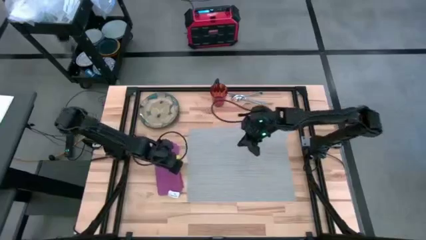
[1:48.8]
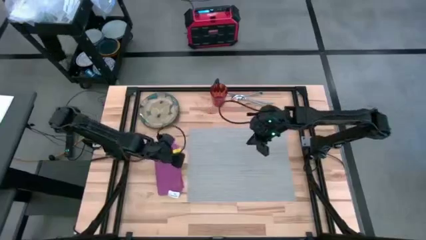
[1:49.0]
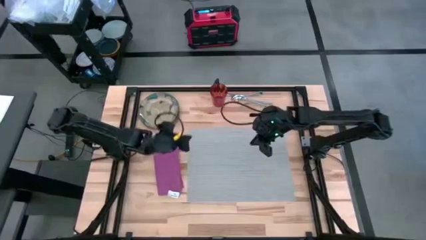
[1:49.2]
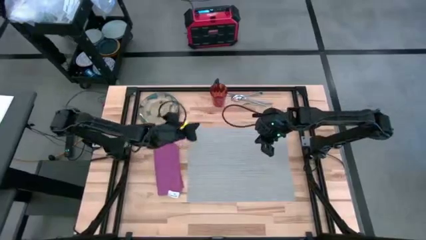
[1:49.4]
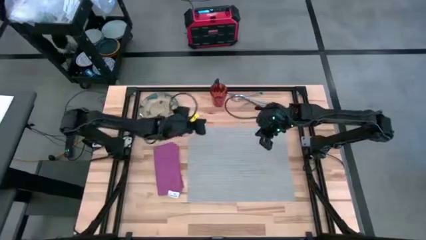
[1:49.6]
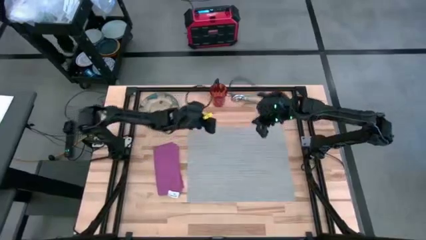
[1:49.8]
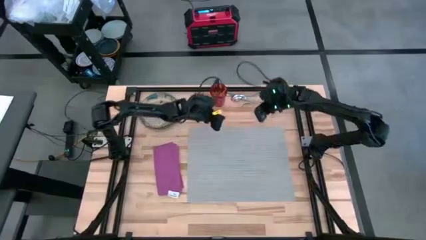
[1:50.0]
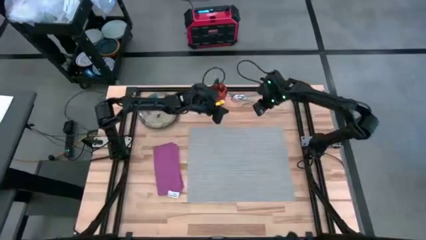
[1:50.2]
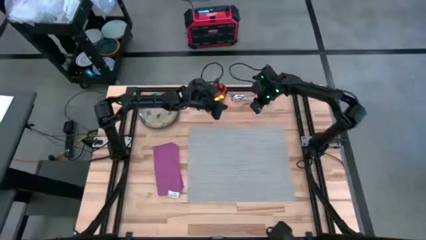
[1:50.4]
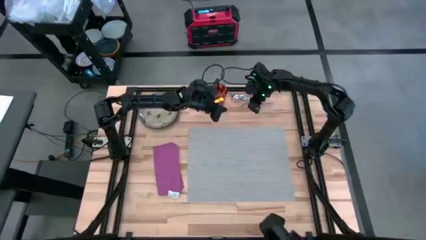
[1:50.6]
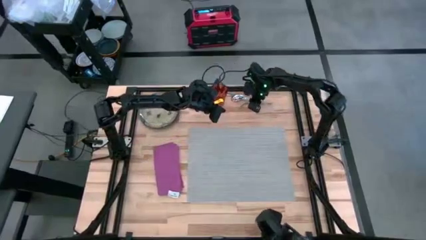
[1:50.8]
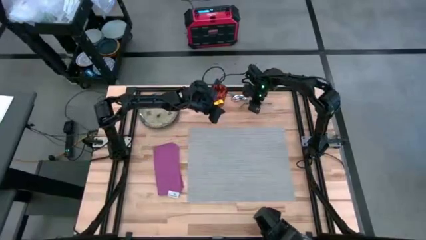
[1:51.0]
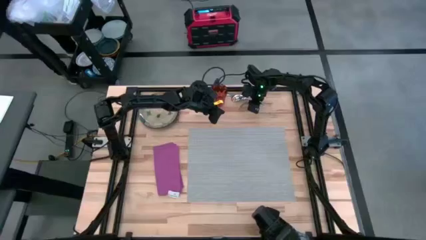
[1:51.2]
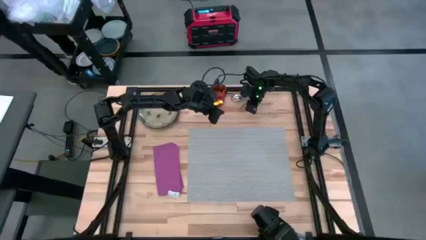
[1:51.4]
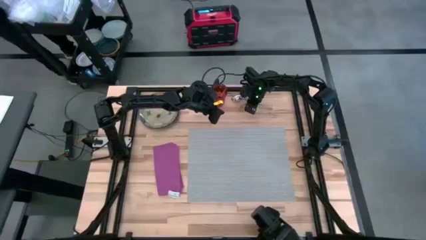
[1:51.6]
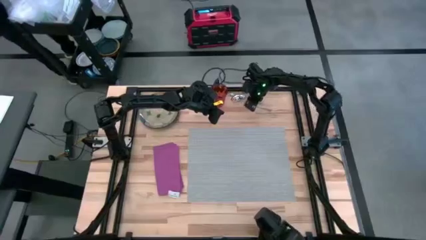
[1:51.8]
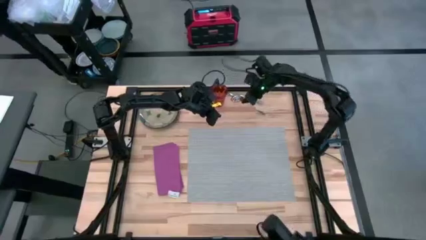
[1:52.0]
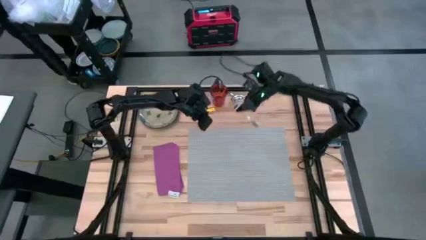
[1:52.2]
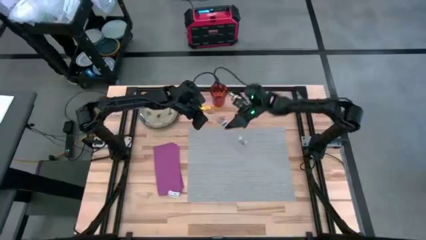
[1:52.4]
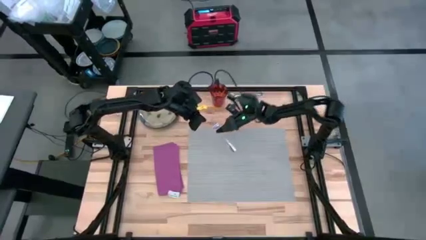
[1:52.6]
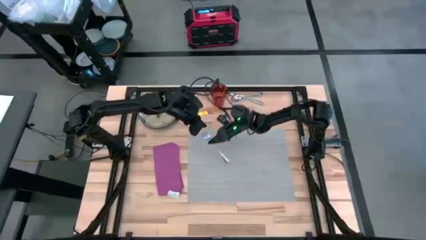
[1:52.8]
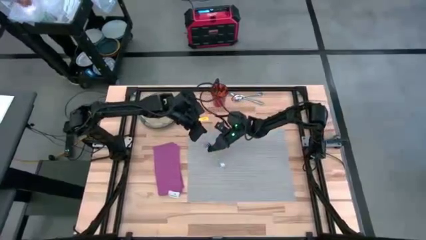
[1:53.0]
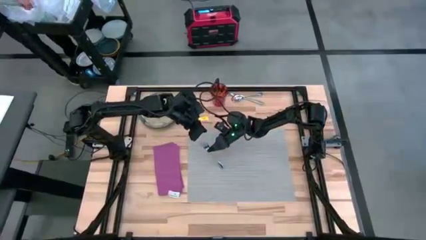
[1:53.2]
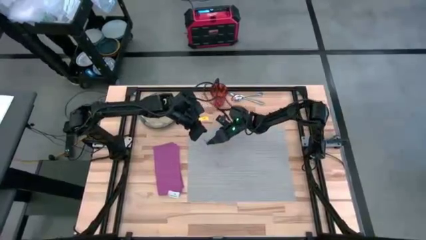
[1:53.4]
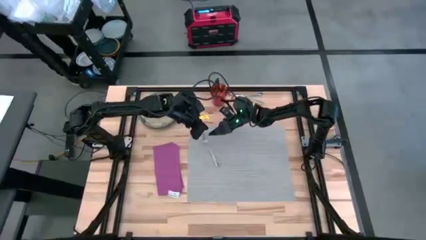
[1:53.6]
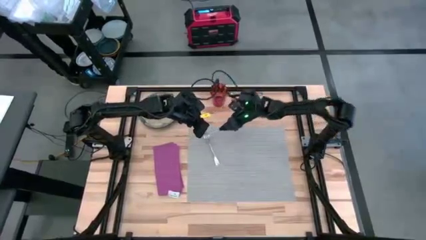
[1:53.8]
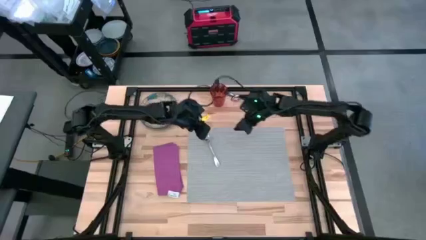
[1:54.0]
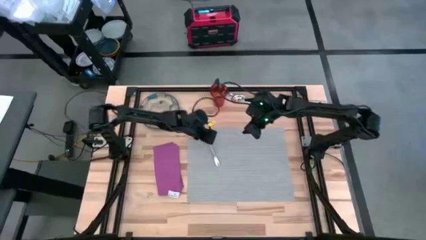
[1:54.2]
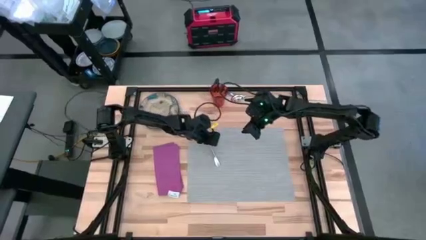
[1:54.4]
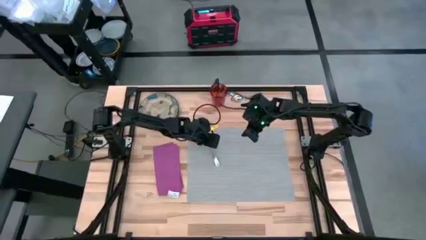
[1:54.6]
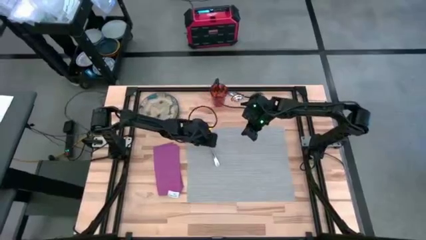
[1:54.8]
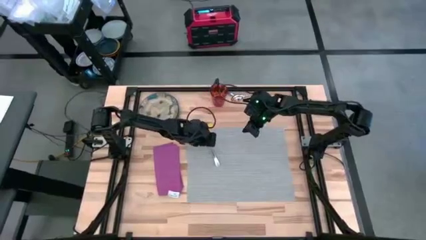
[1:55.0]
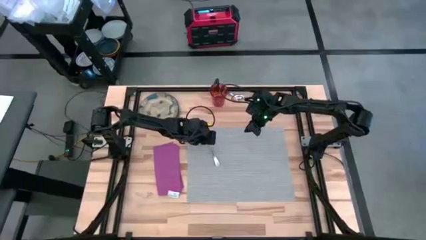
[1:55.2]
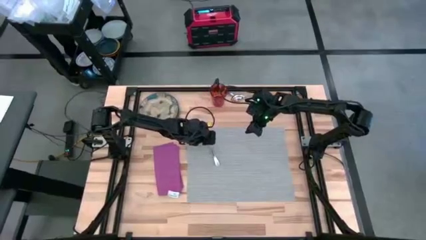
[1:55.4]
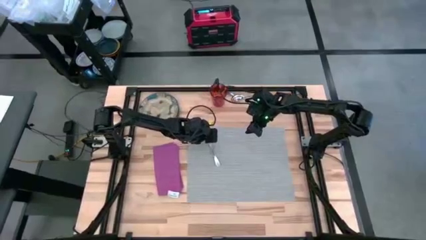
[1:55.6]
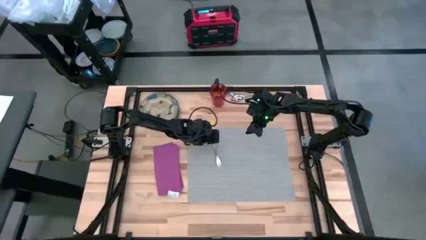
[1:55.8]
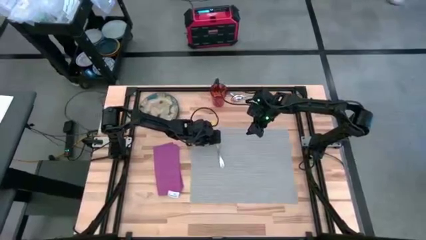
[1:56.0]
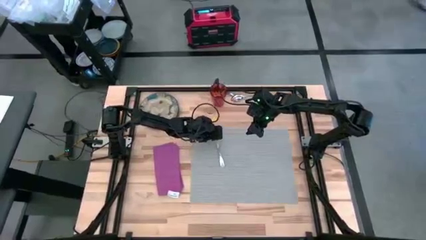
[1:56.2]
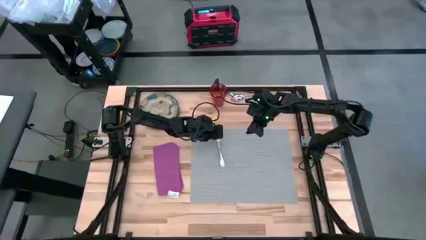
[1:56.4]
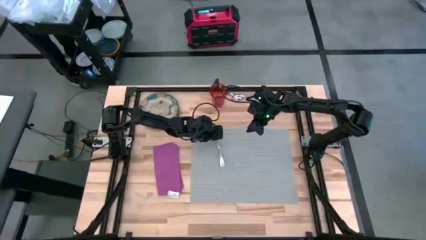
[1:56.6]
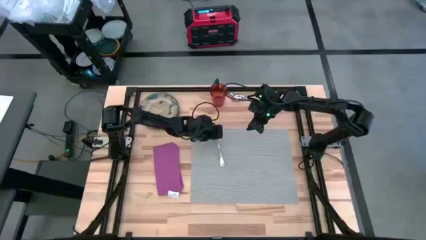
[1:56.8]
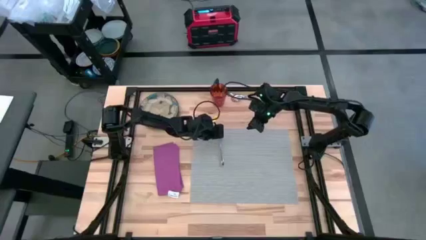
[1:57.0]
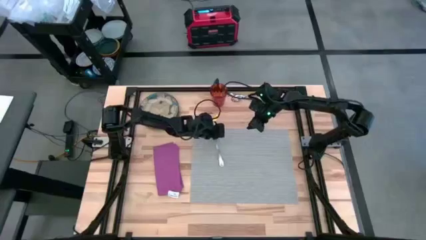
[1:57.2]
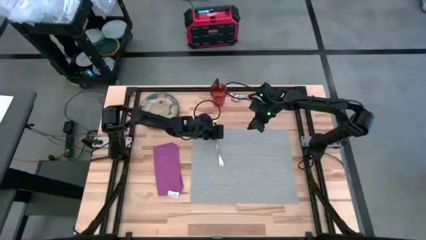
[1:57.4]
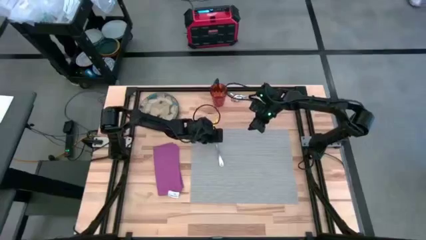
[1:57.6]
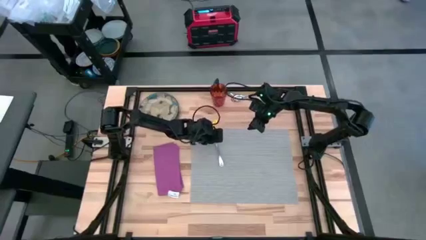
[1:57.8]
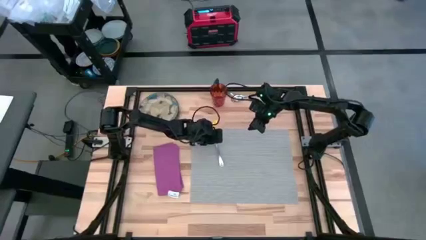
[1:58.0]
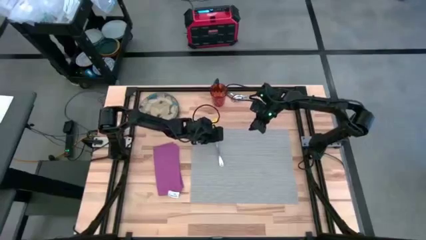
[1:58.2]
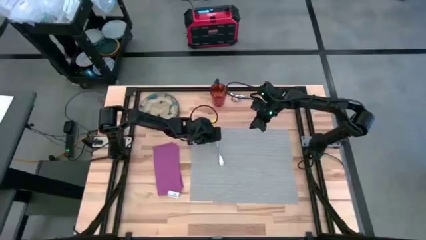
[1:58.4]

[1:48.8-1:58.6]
Task: Set table place
Put the fork on top of the purple table napkin

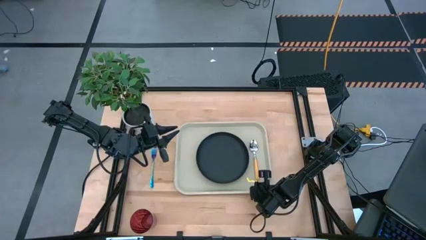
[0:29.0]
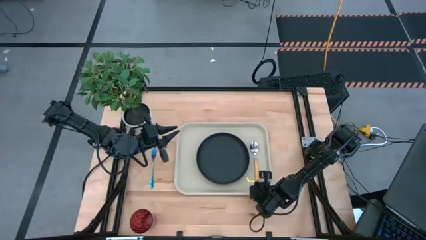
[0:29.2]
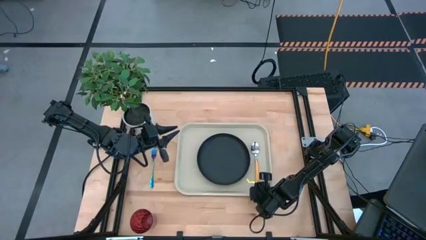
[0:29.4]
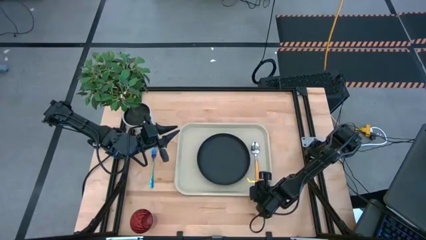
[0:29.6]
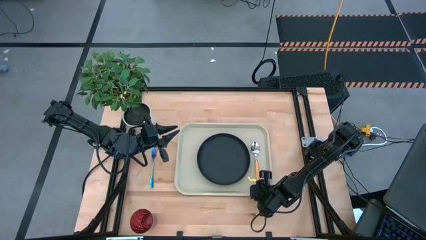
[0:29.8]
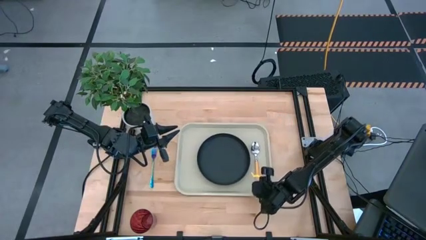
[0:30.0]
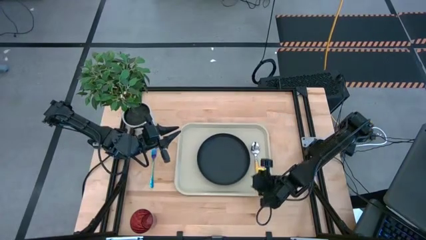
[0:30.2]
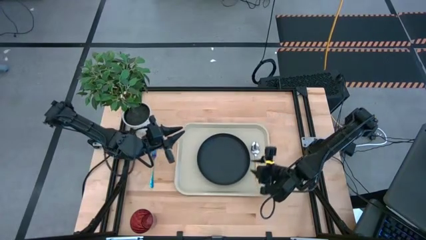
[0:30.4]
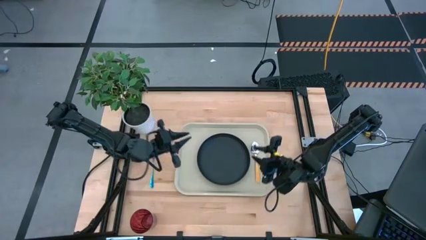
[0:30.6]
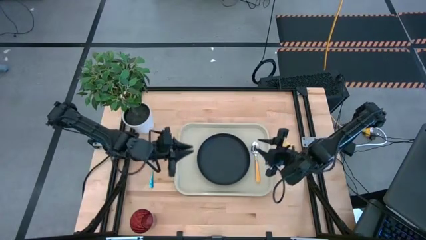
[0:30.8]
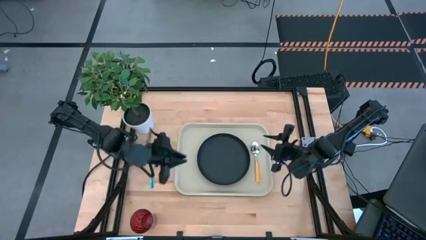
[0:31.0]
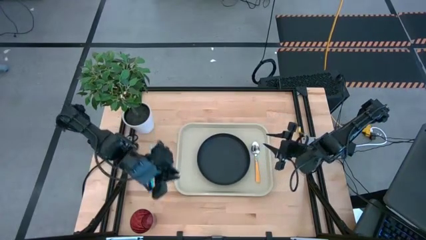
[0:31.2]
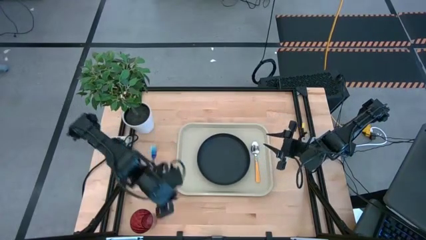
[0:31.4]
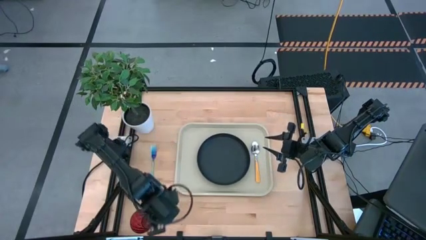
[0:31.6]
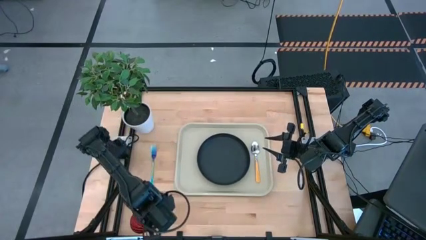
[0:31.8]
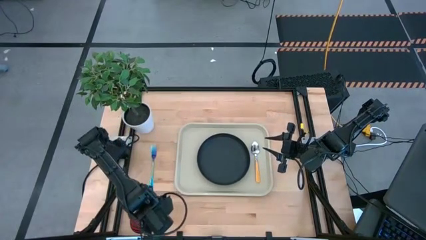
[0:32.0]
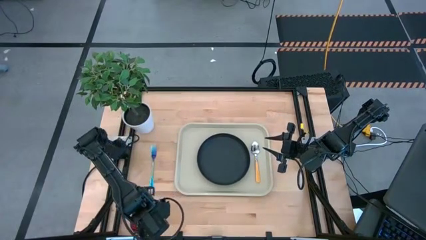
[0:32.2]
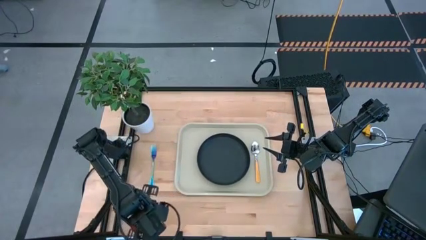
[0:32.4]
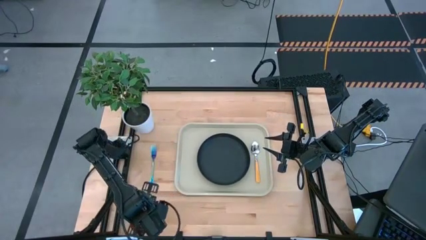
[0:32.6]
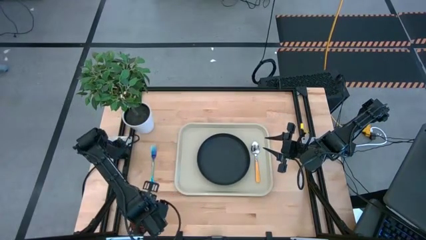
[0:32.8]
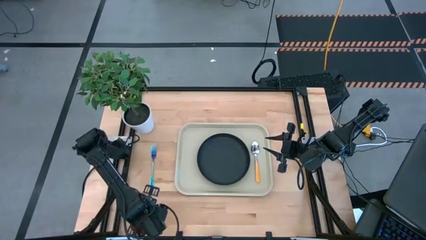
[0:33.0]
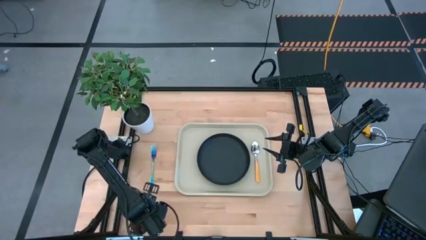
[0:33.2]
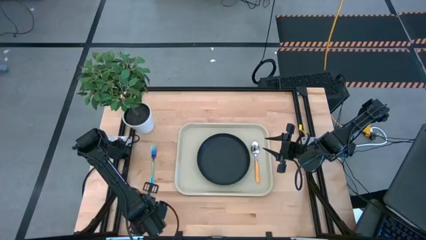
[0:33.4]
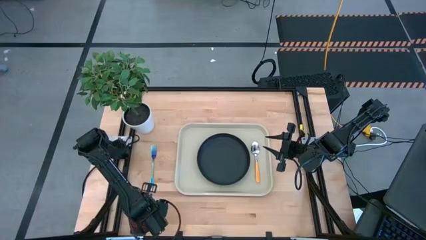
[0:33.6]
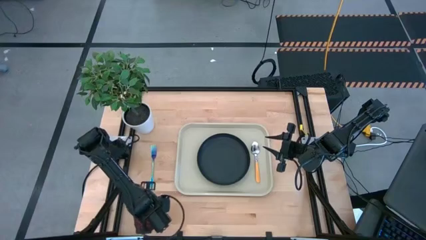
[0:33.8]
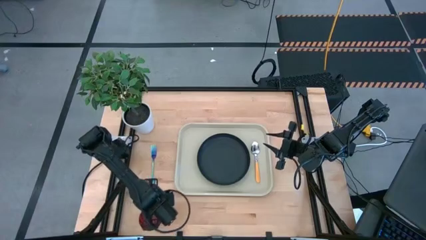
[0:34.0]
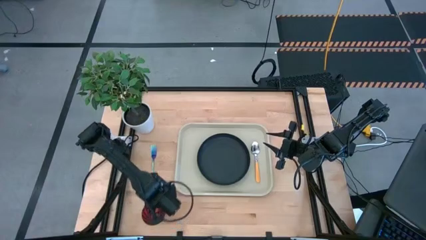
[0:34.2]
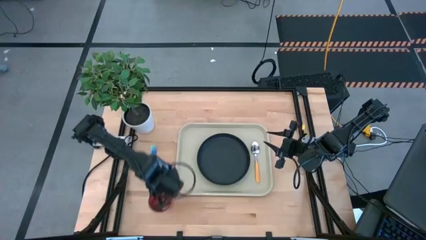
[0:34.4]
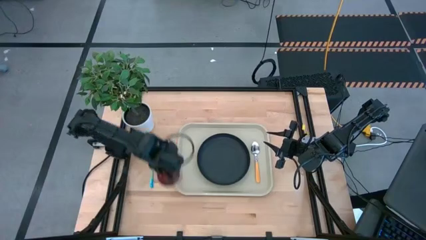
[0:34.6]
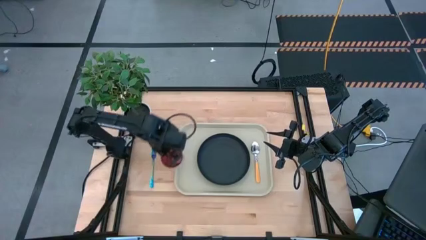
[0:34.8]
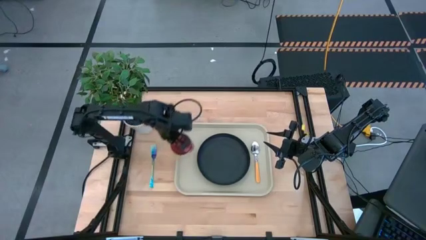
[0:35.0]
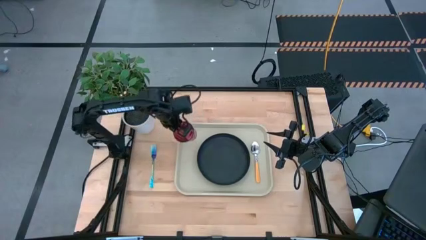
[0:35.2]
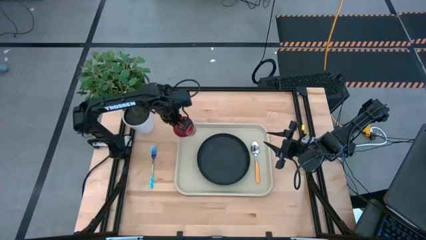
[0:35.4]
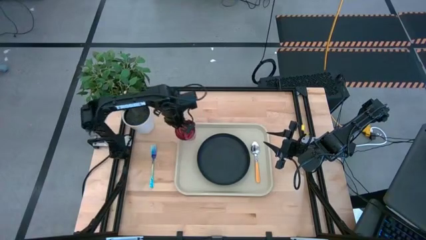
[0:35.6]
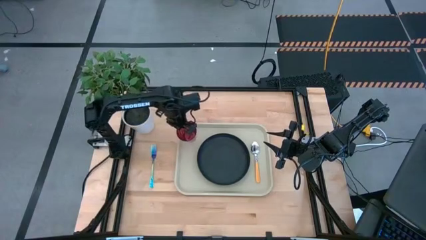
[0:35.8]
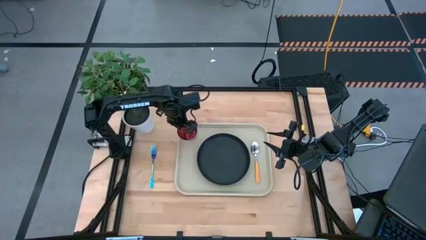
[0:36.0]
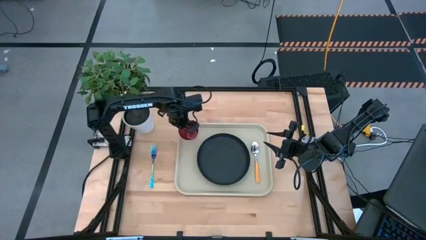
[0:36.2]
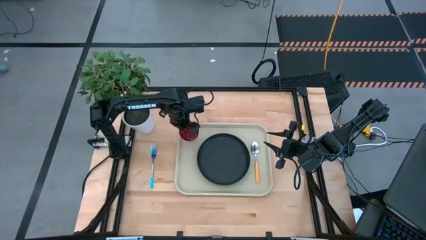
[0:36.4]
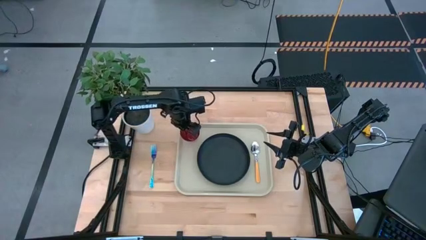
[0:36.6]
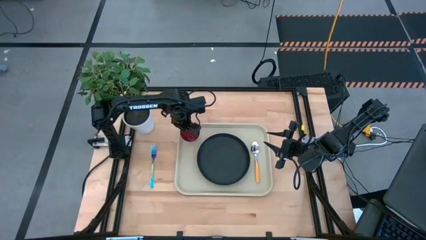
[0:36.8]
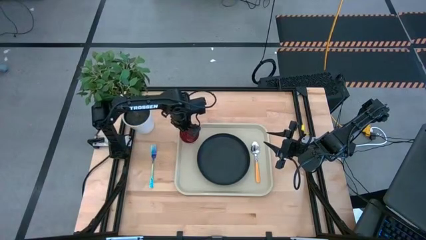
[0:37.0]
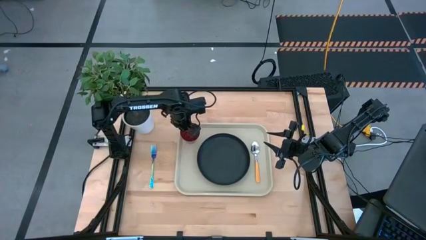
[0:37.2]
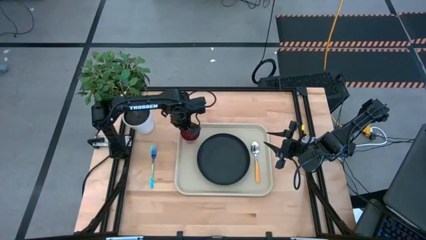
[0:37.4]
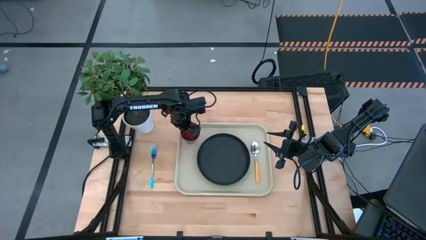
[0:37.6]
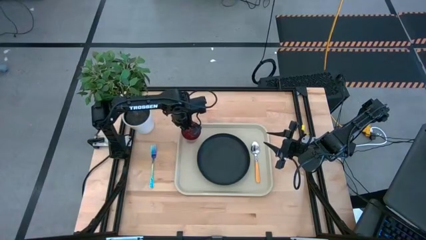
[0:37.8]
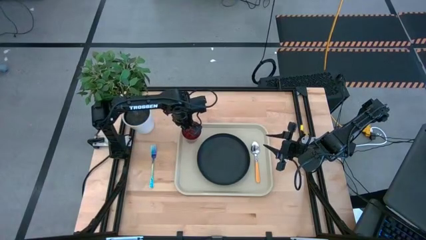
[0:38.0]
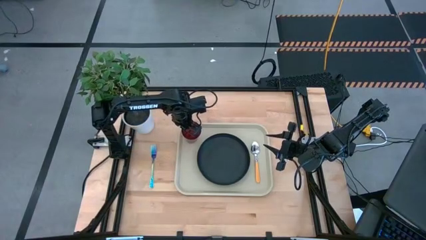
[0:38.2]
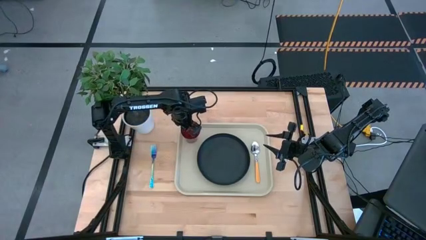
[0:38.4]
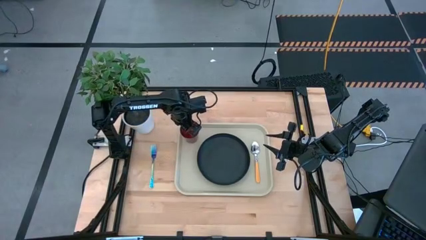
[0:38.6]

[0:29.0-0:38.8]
Task: Pick and place plate/cup/fork/spoon on tray
Put the red cup on the top left of the tray
